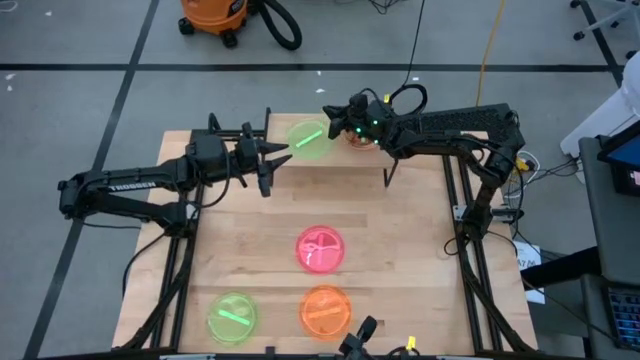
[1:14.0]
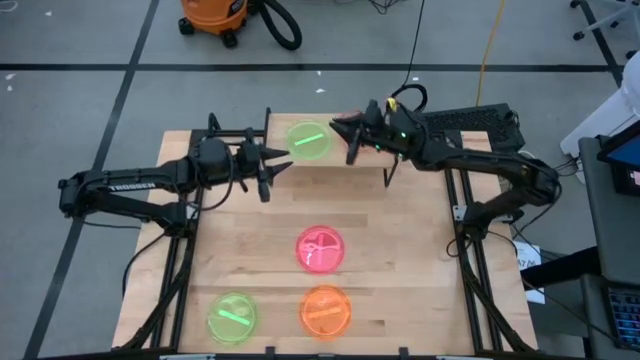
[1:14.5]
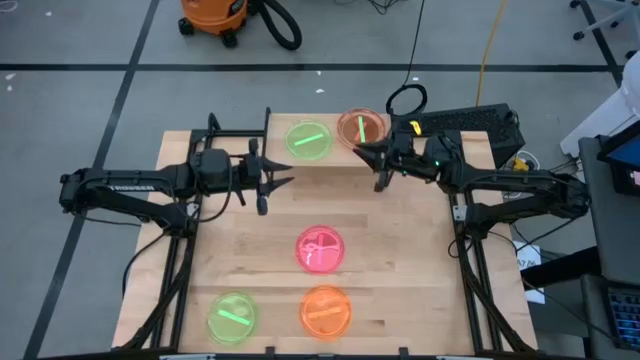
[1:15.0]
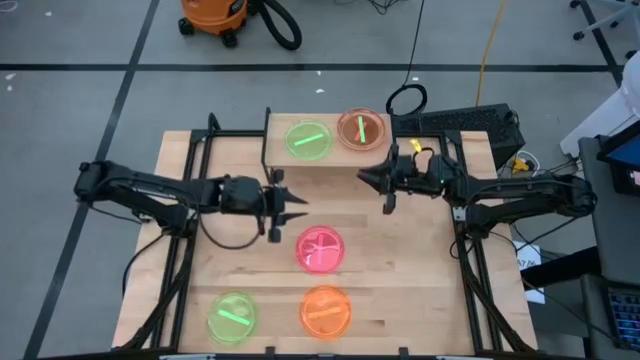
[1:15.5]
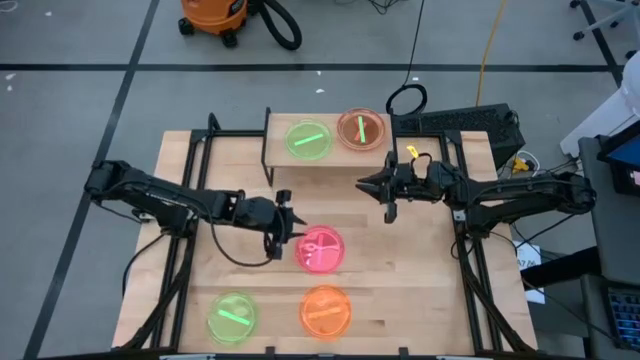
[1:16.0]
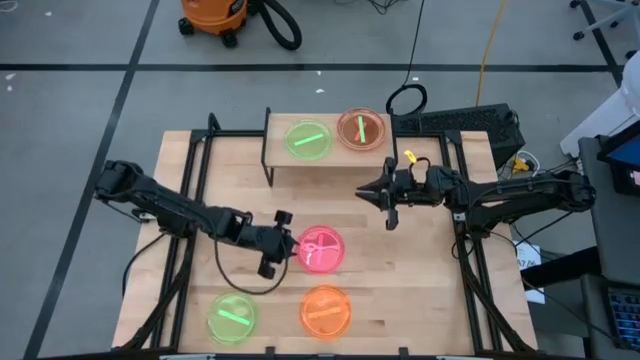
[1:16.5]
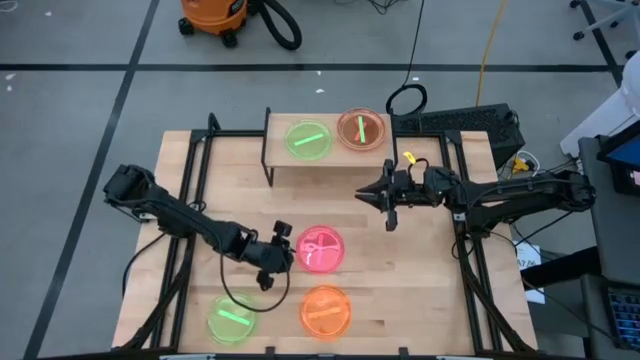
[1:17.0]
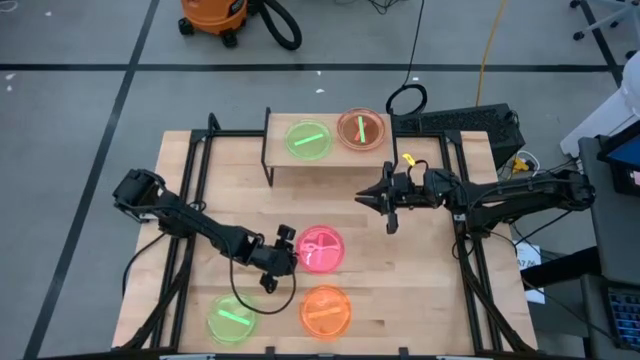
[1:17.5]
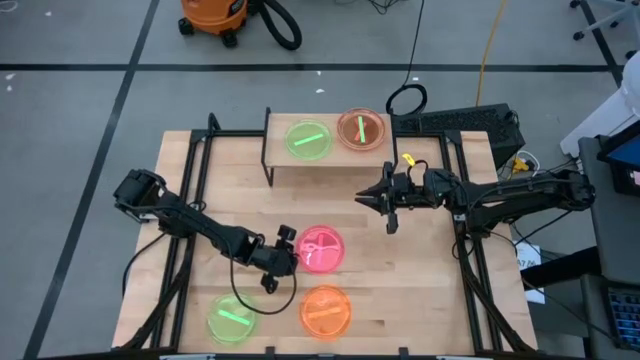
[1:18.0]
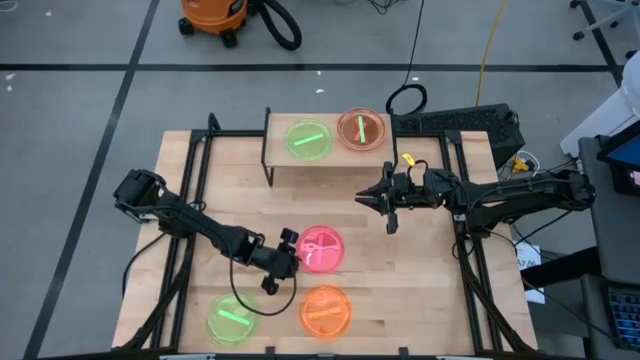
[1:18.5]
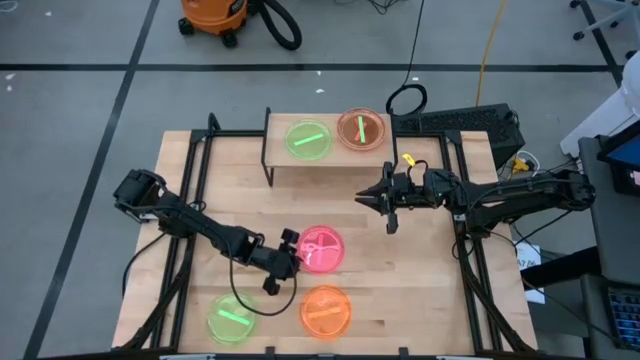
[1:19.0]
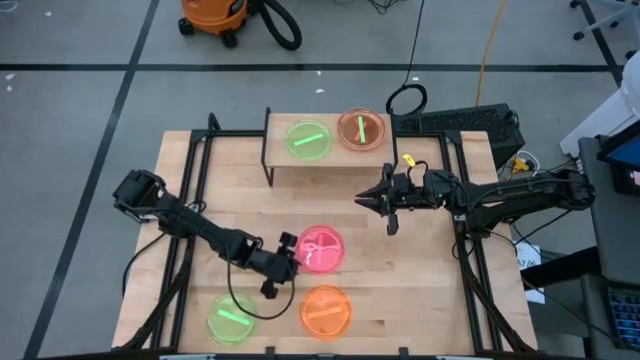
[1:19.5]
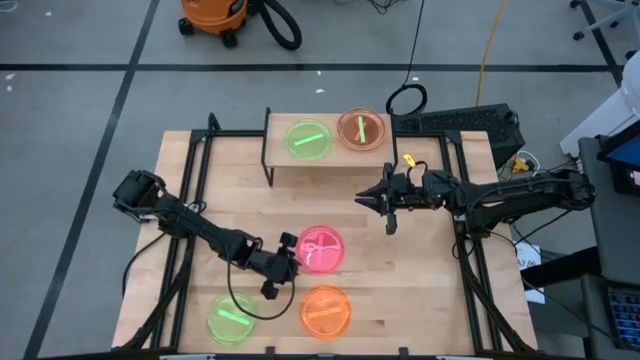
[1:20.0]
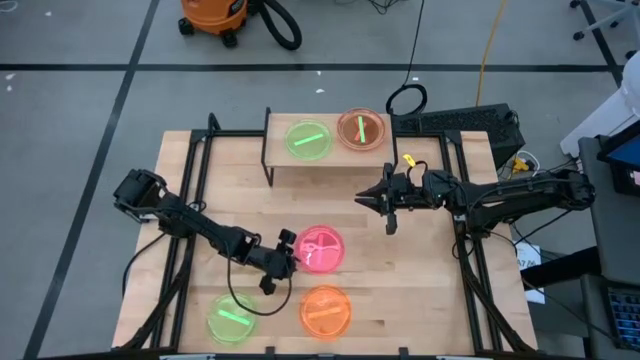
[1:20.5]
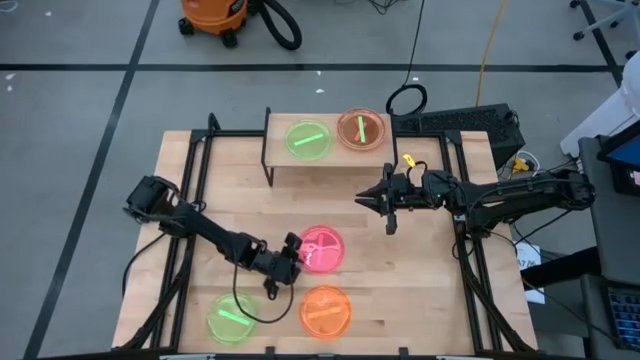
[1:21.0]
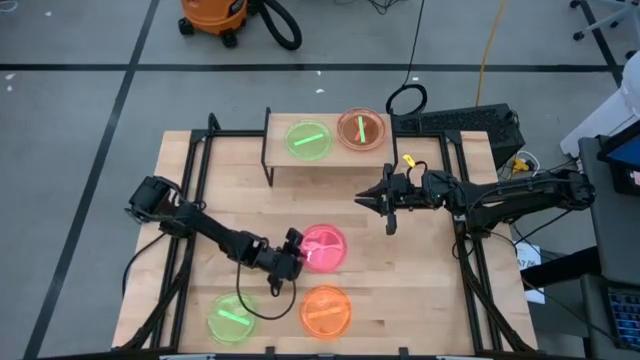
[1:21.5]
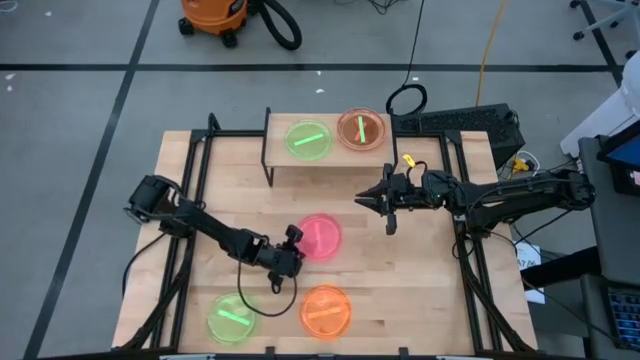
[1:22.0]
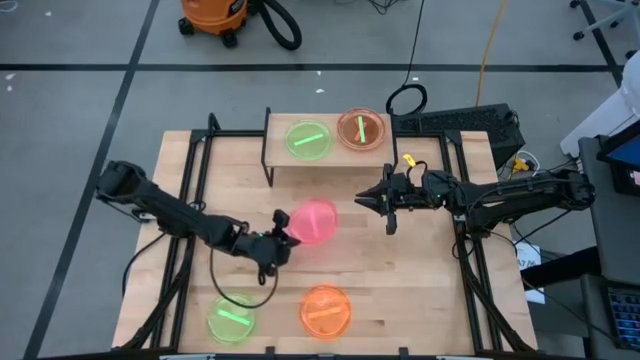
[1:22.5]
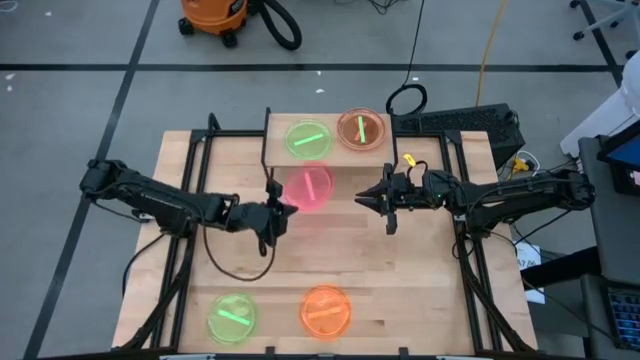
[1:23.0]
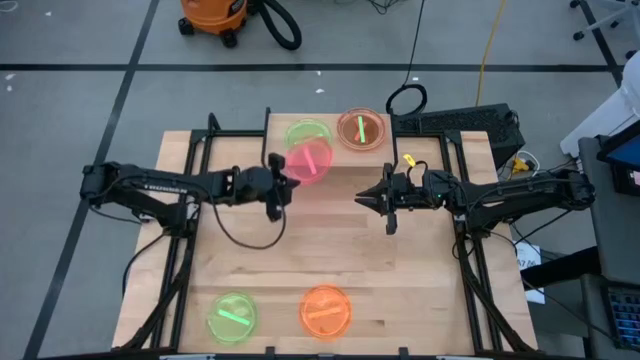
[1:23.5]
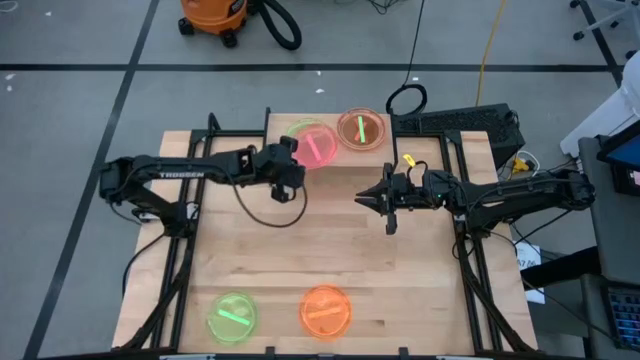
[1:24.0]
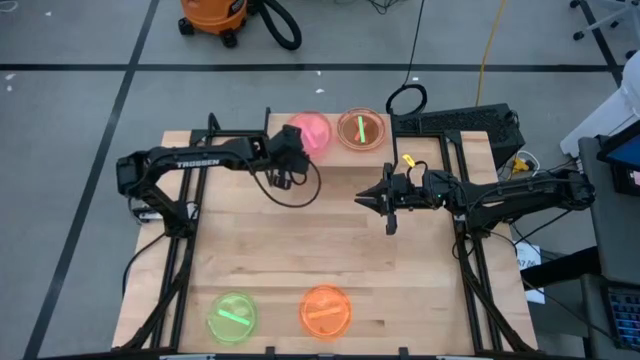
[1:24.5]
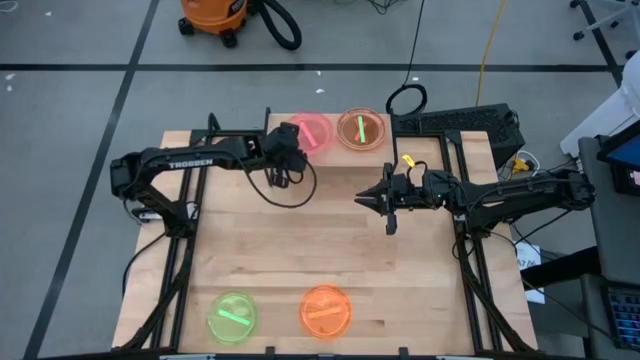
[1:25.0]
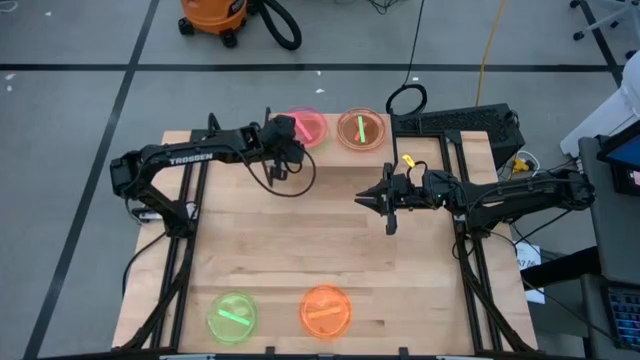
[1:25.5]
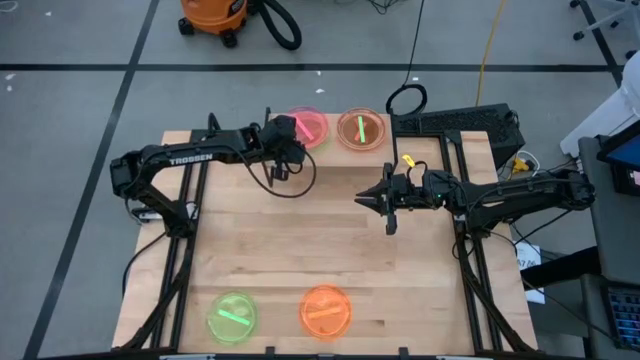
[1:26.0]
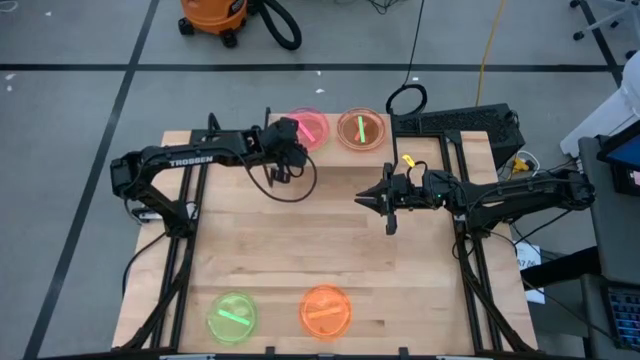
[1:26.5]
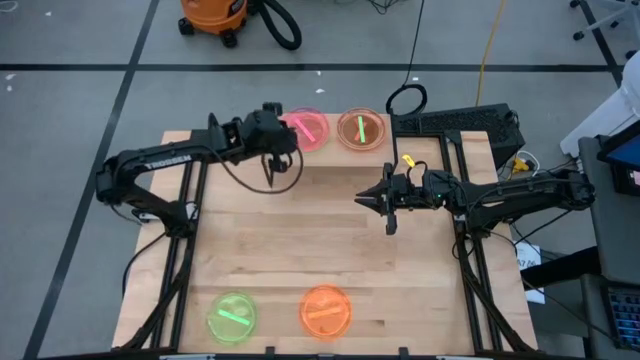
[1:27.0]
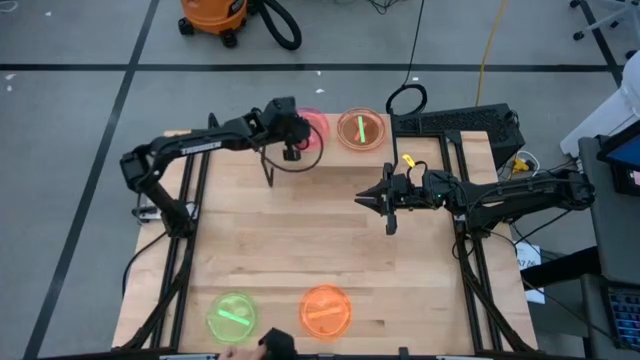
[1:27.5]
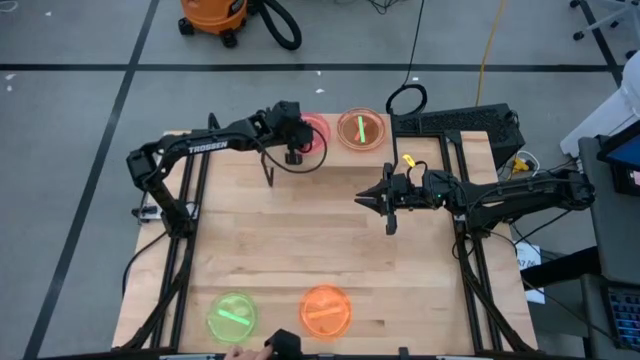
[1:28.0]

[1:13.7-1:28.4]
Task: Place and stack plates onto a shelf
Stack the pink plate on top of the green plate on the shelf

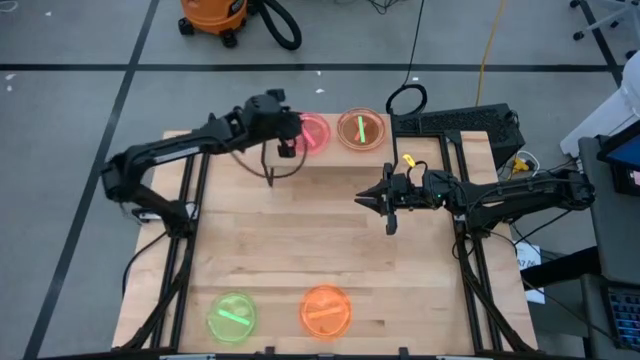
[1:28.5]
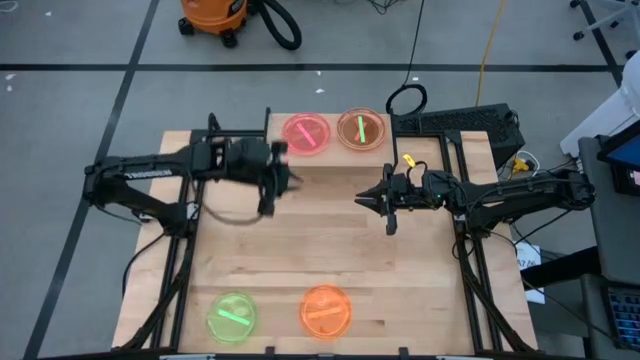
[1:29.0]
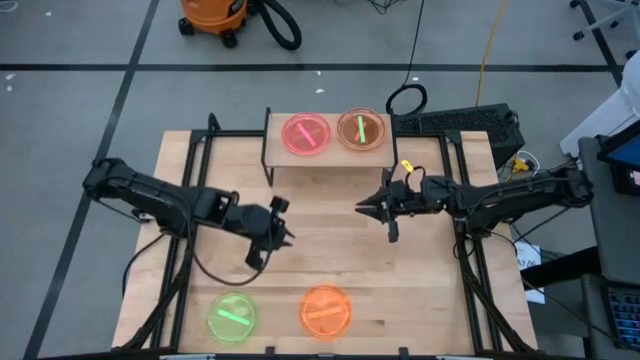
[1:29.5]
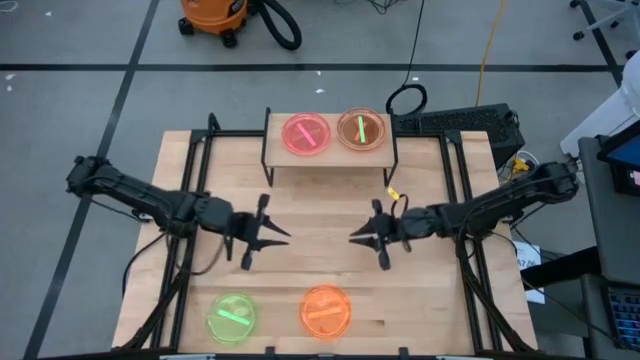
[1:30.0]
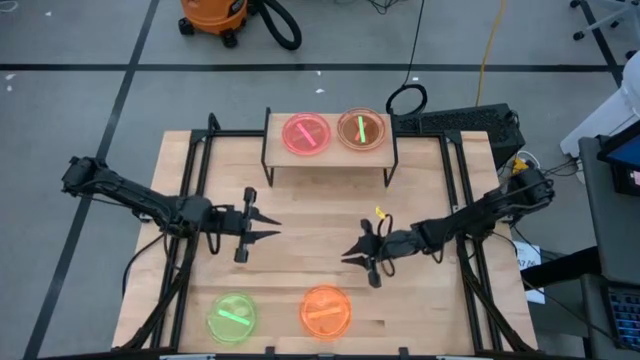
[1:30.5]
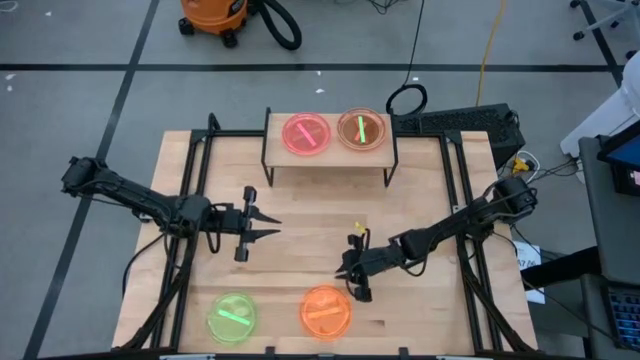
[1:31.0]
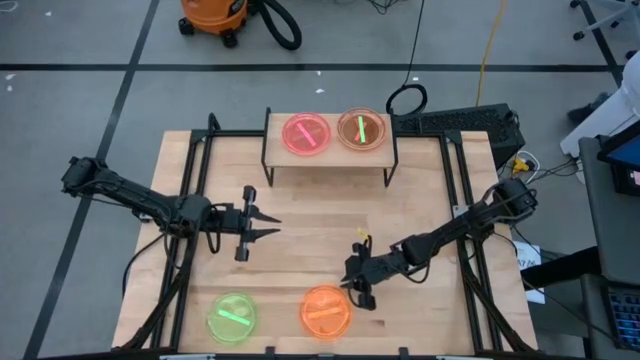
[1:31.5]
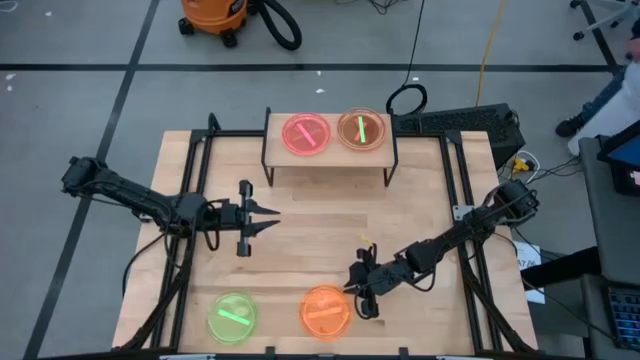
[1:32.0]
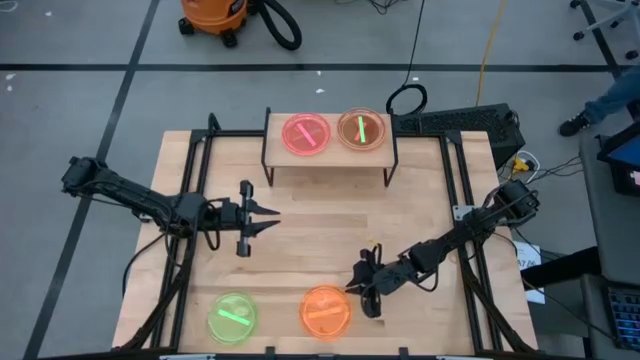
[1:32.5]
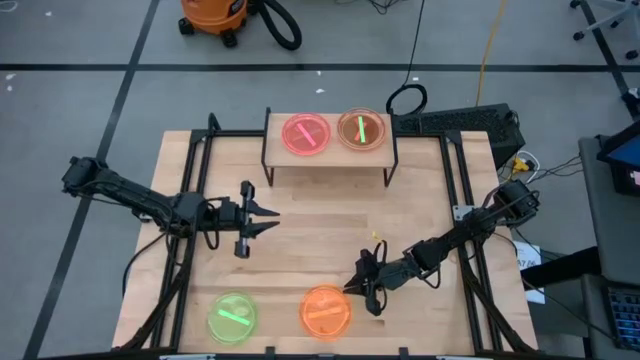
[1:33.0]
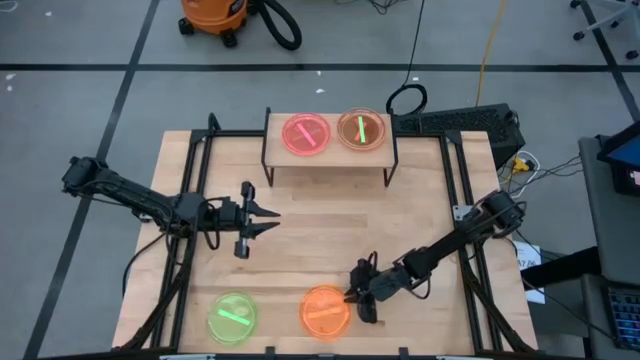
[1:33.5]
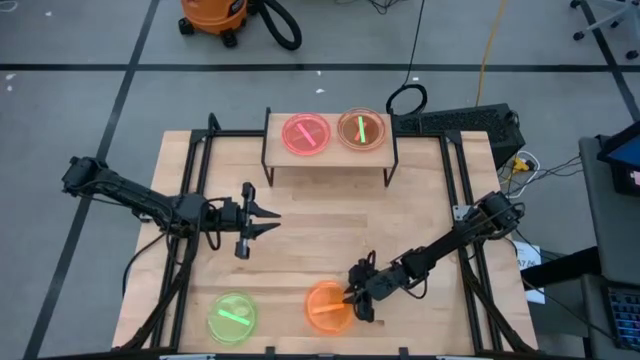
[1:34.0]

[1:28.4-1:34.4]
Stack the orange plate on top of the pink plate on the shelf
